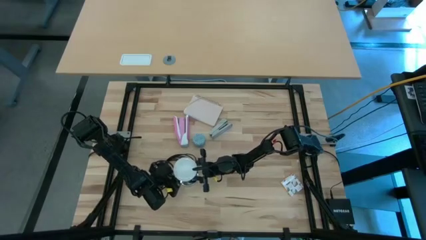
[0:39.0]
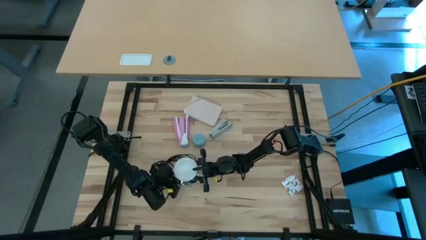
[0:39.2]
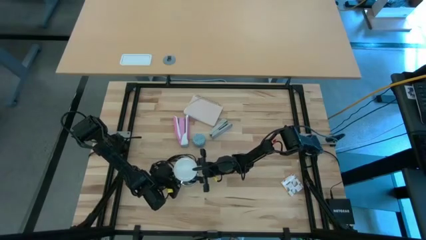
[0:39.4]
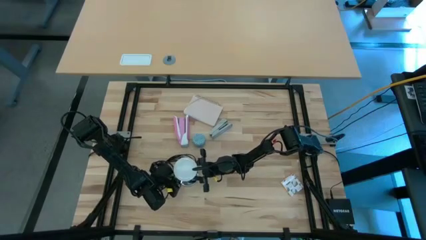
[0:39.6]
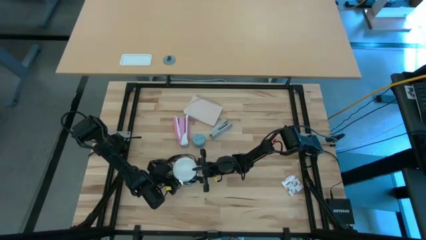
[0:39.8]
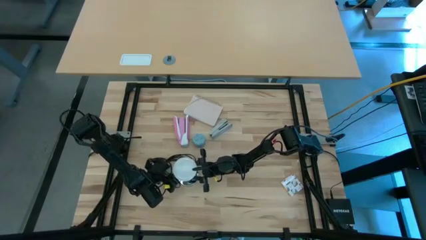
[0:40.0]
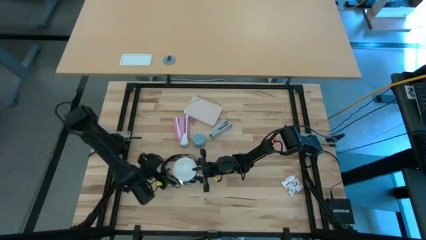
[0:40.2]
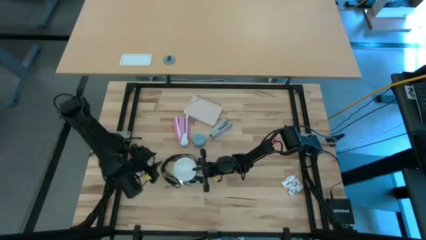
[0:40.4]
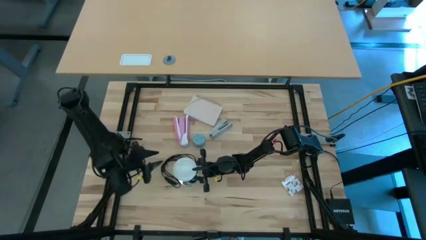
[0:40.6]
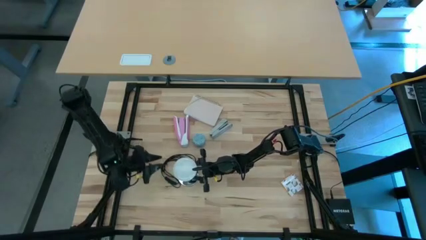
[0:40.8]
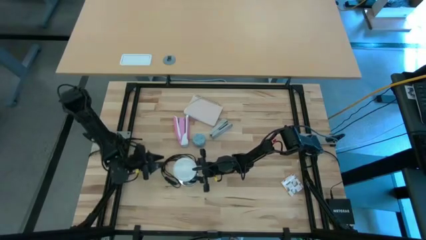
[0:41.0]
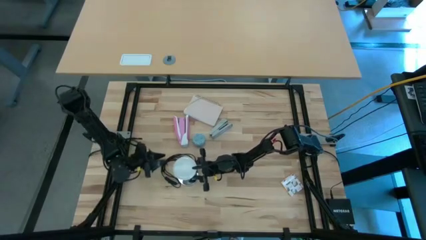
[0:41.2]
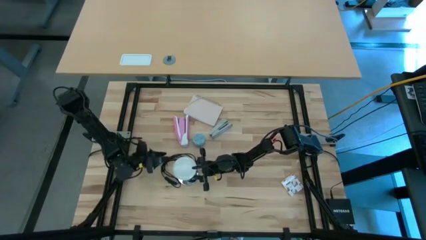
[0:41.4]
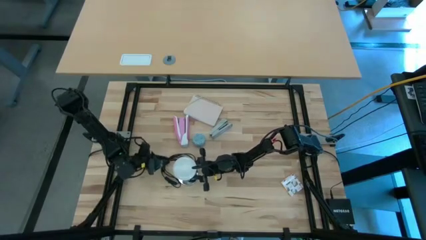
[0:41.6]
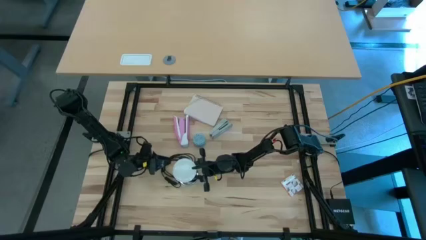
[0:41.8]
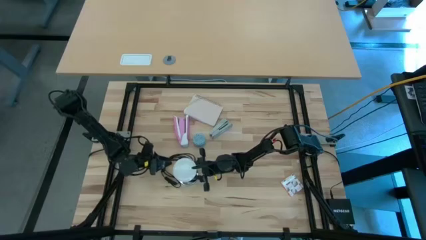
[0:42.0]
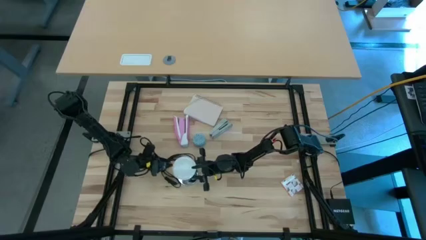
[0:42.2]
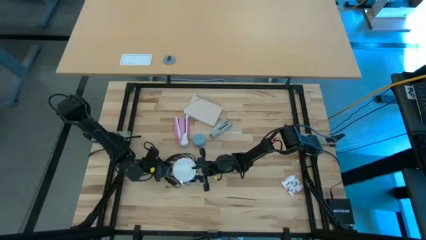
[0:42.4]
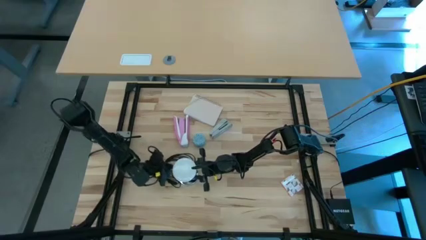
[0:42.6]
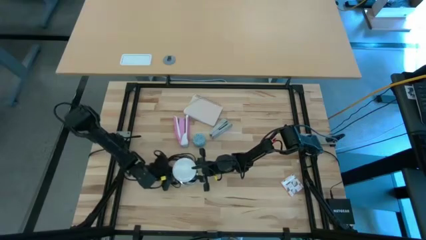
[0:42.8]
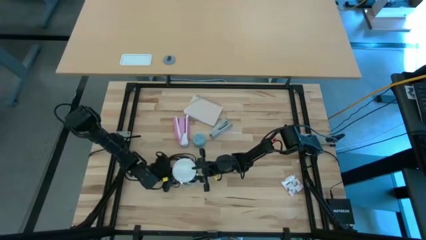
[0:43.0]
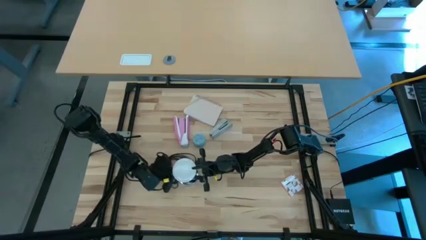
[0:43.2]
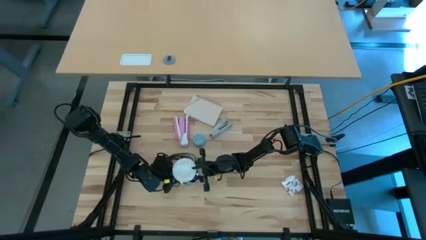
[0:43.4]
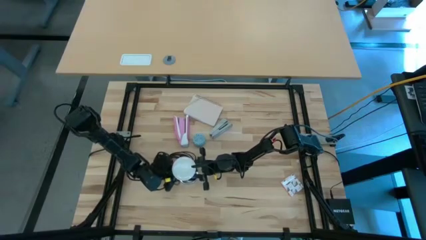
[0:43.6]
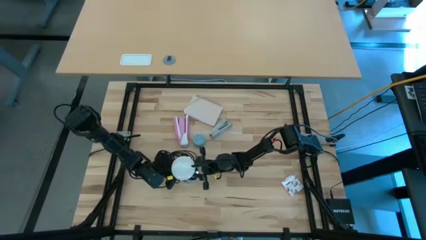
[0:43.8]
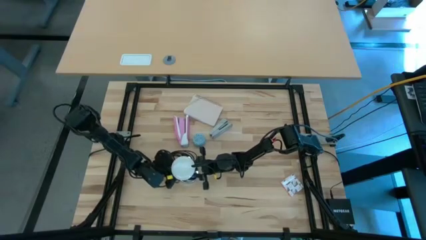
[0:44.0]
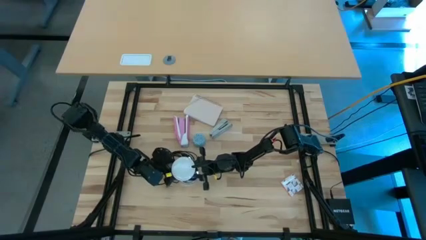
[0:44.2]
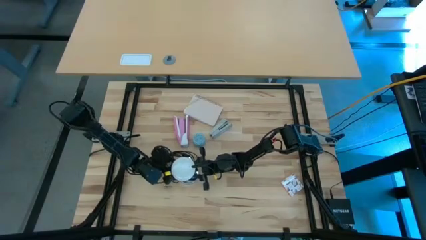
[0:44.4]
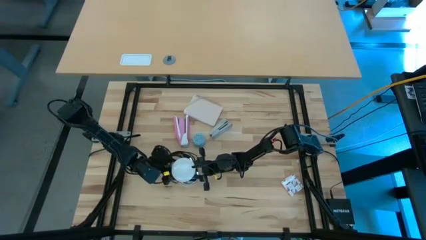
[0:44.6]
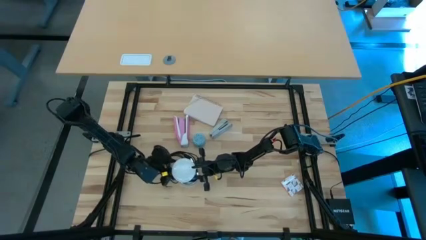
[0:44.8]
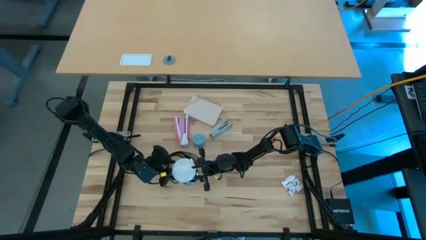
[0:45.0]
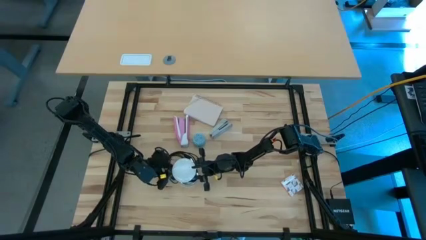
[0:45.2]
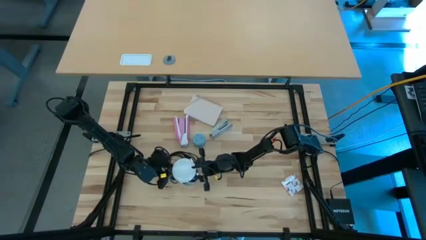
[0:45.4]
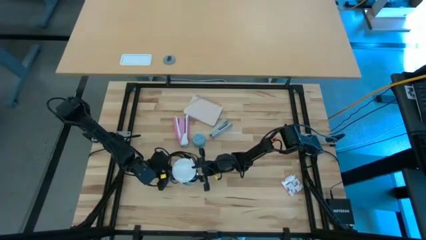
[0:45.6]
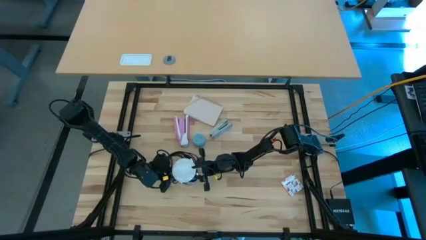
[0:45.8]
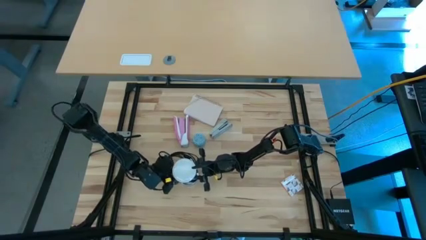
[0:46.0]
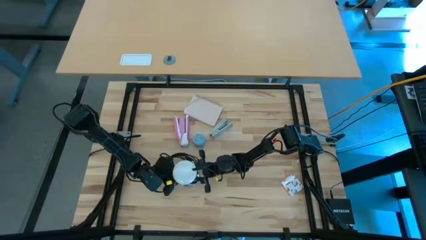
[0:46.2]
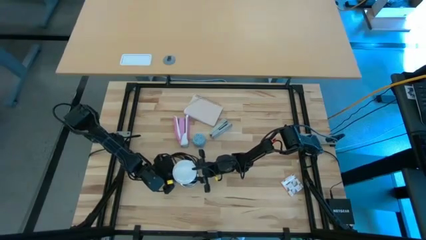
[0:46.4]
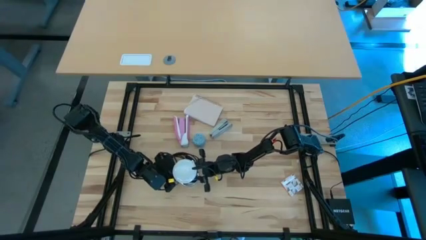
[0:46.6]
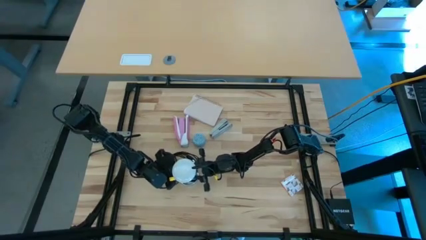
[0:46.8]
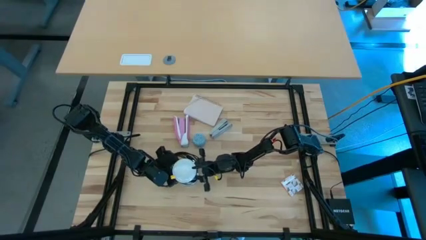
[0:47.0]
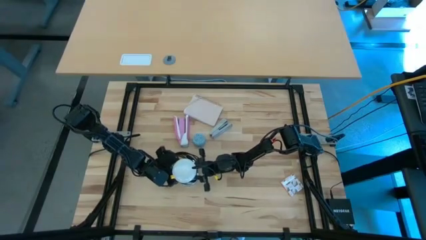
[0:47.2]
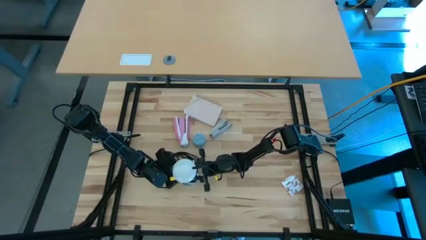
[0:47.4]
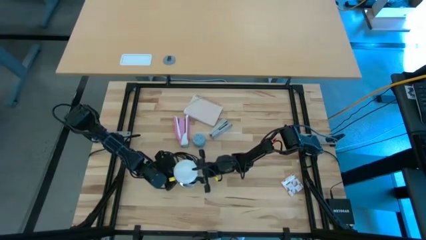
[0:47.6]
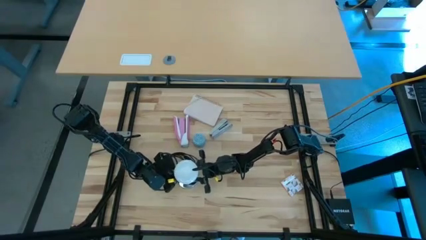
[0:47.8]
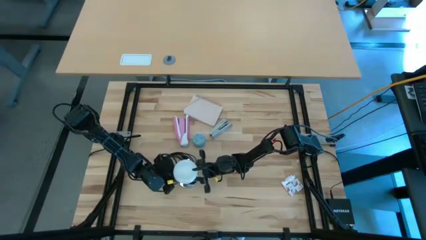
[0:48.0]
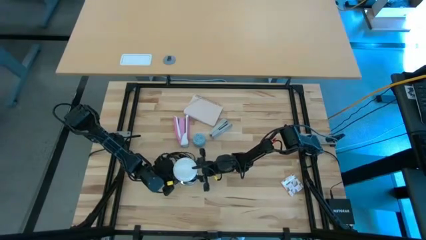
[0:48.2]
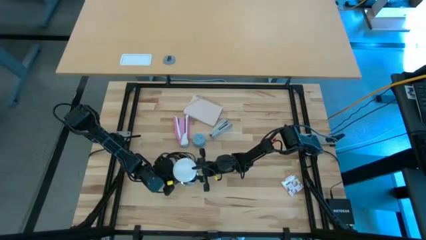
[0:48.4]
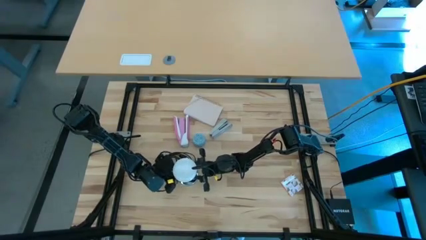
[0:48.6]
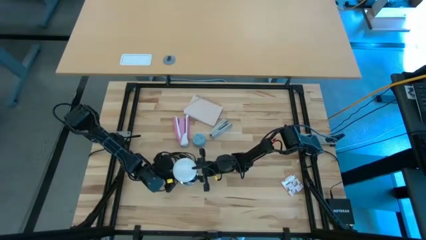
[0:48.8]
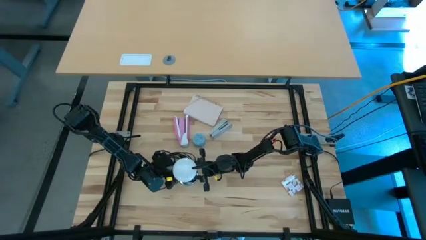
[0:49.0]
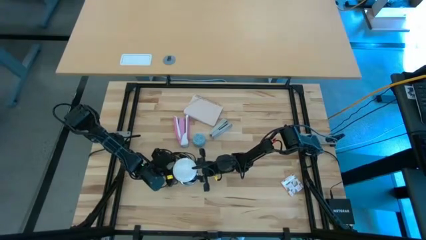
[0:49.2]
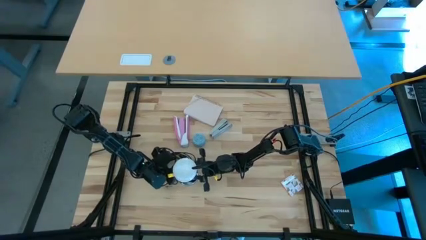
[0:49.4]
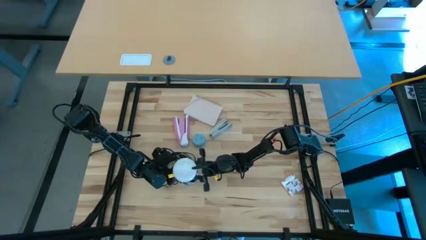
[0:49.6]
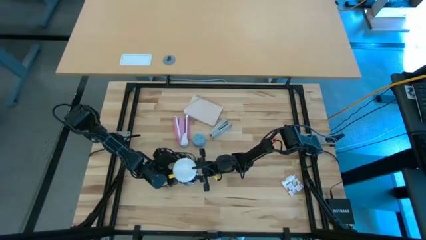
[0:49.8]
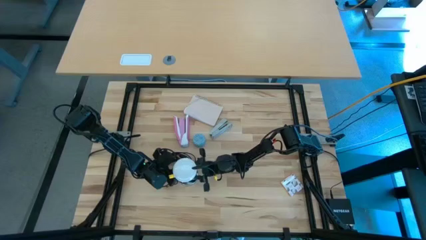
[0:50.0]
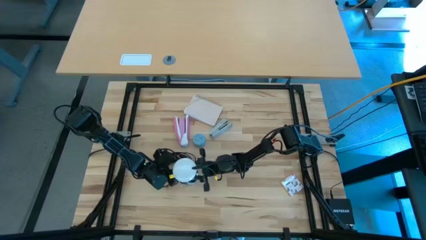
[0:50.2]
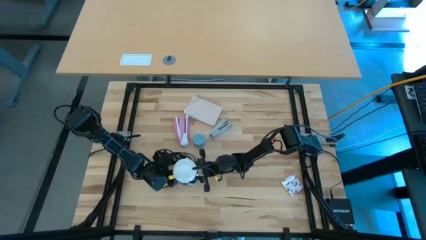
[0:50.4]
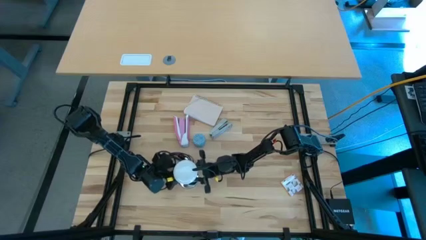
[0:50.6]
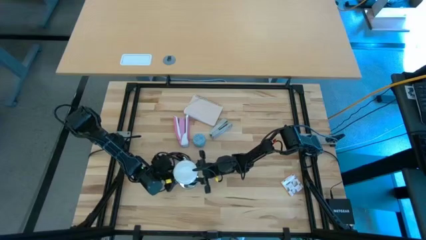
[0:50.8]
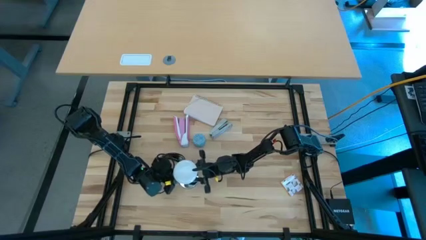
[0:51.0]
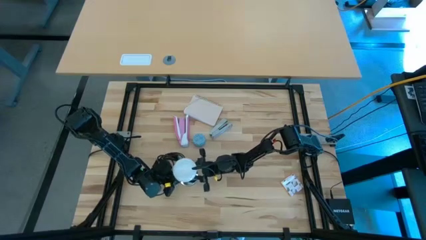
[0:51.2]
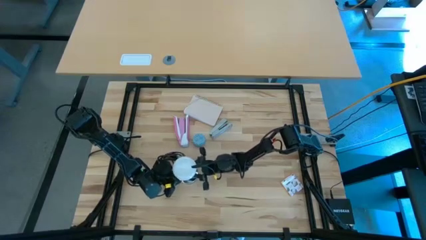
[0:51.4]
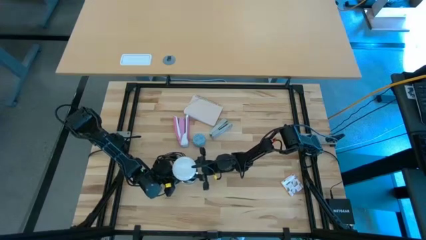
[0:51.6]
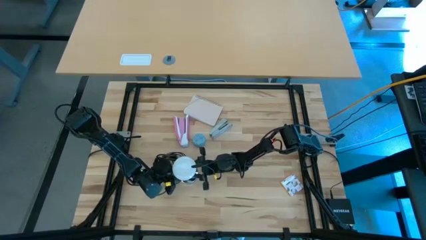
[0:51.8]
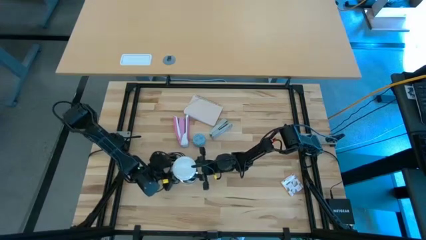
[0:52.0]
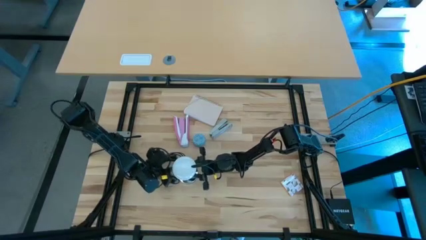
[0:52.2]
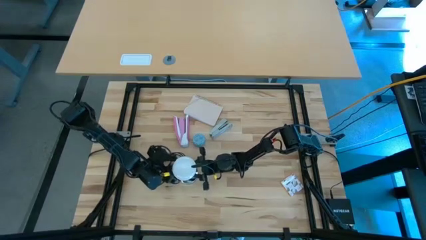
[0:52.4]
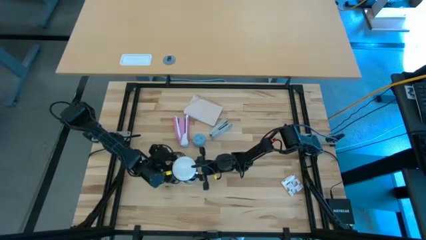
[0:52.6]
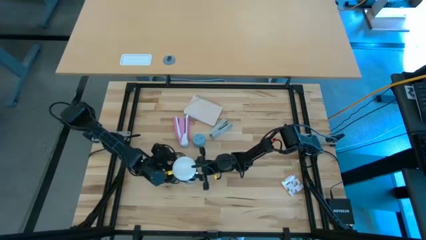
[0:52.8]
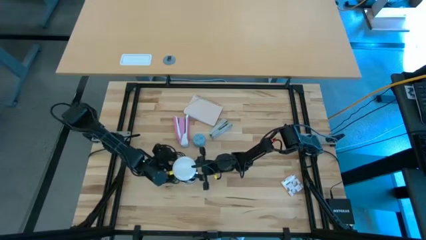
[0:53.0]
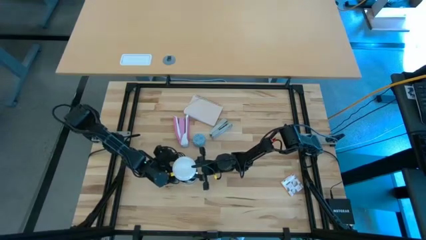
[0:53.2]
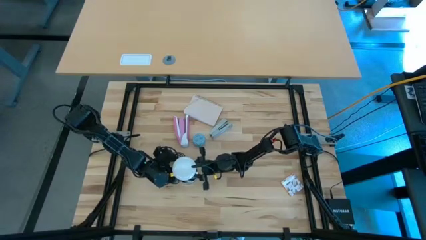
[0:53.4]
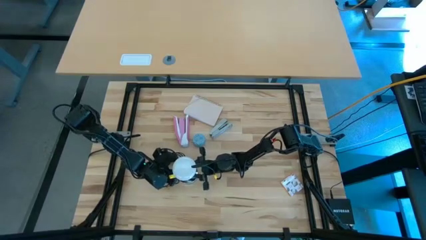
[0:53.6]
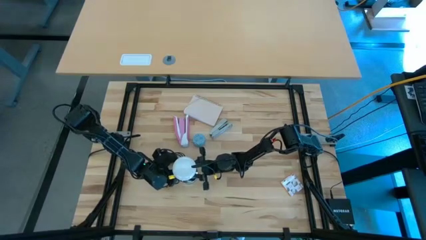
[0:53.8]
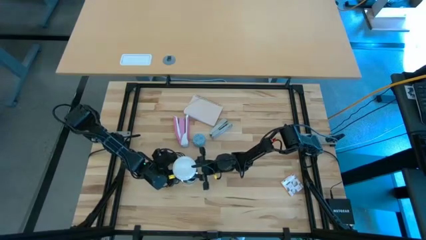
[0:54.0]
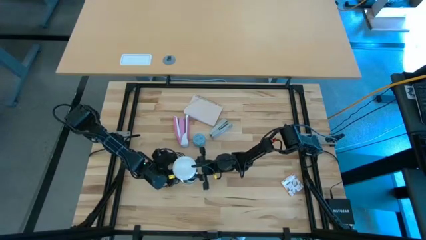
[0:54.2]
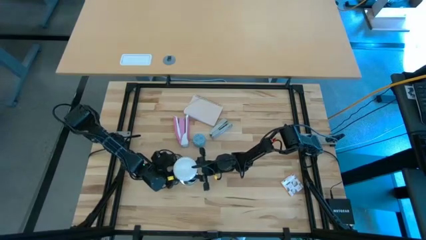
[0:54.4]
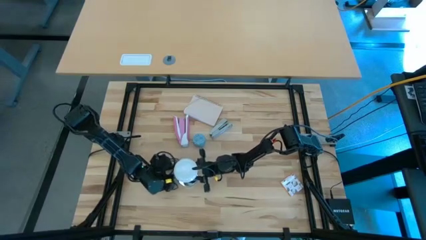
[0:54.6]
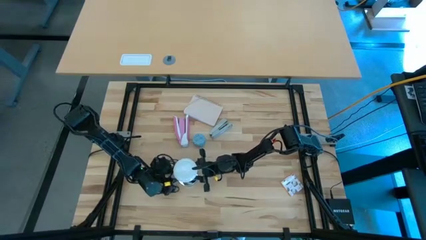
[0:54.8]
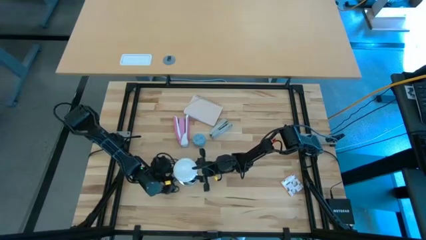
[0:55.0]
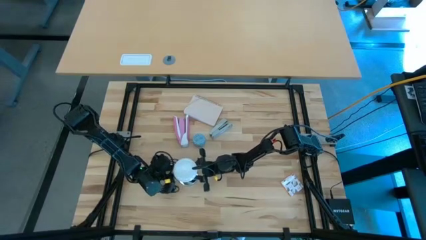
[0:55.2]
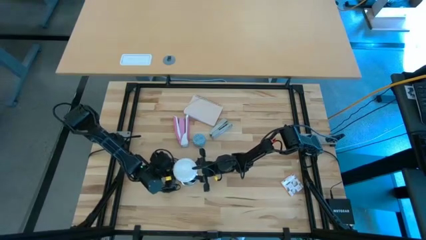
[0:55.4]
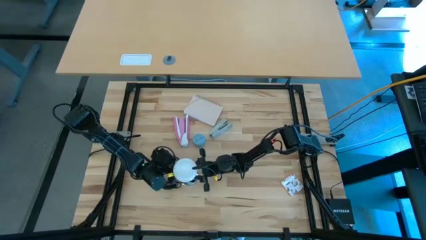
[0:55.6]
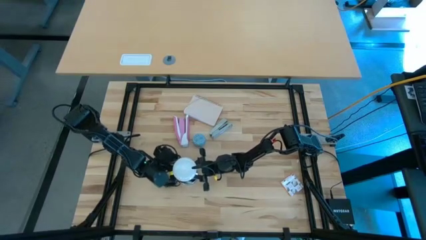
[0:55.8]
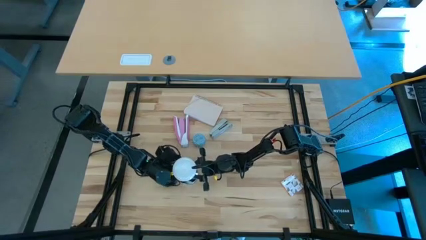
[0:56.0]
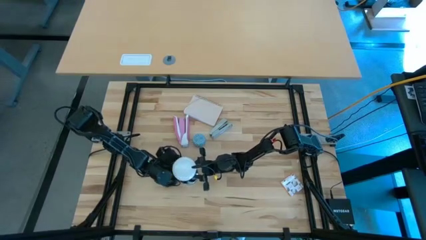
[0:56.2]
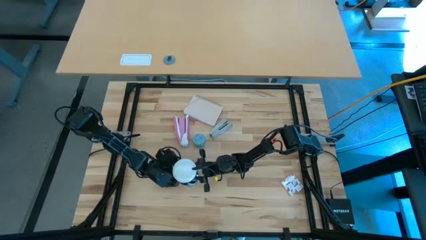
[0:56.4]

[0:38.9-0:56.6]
Task: Screw lightbulb
Insert the lightbulb into the lamp
